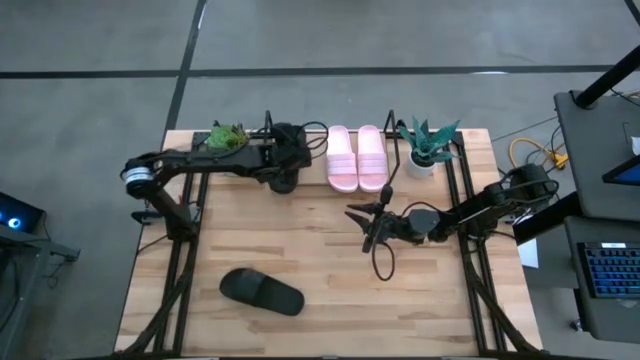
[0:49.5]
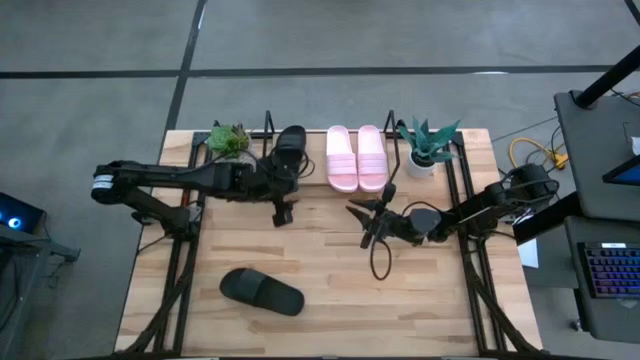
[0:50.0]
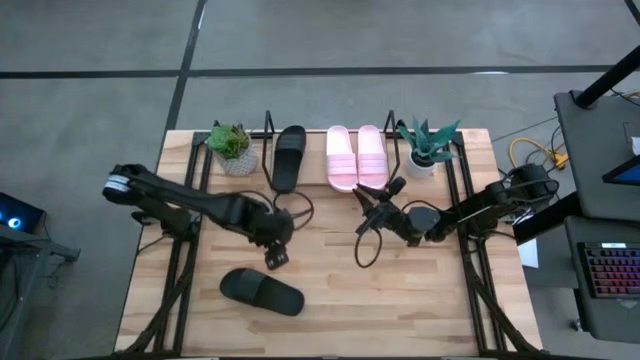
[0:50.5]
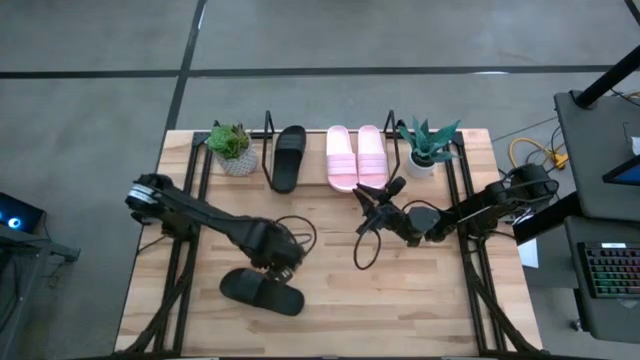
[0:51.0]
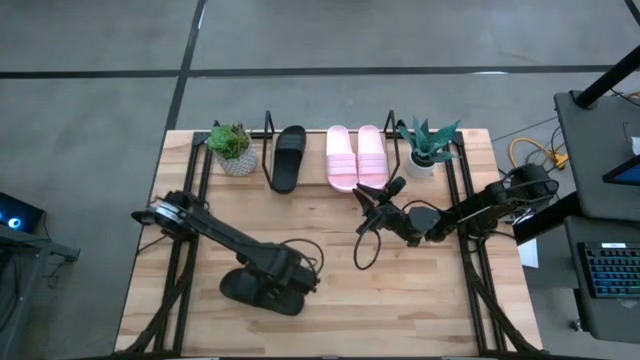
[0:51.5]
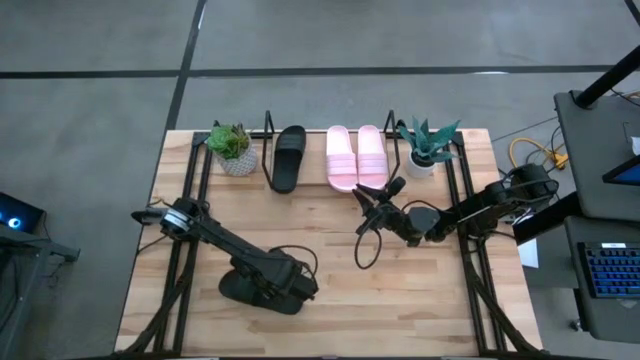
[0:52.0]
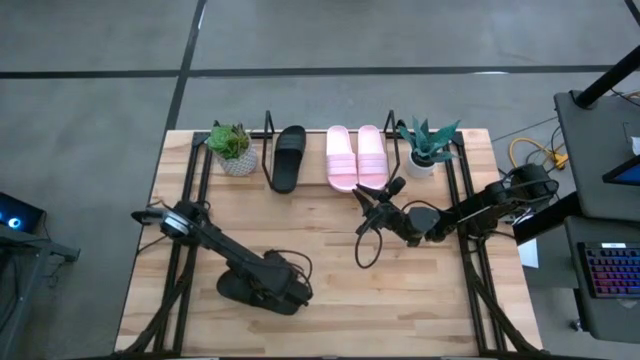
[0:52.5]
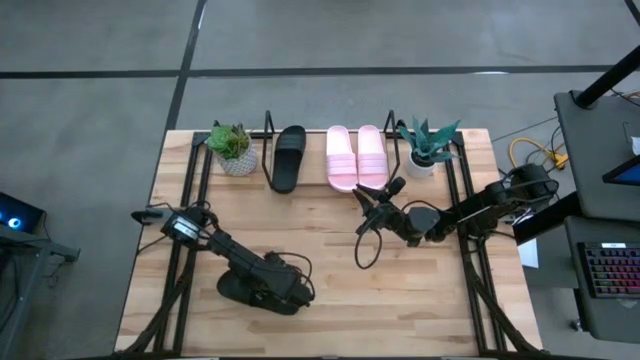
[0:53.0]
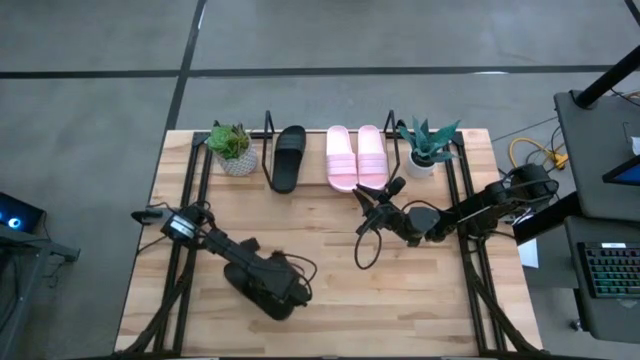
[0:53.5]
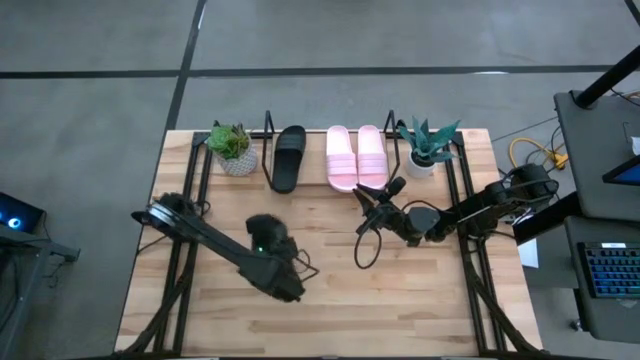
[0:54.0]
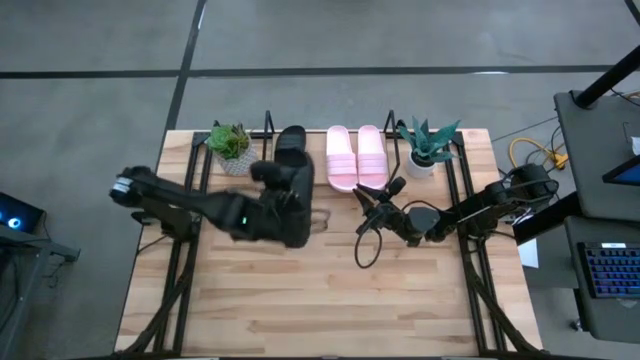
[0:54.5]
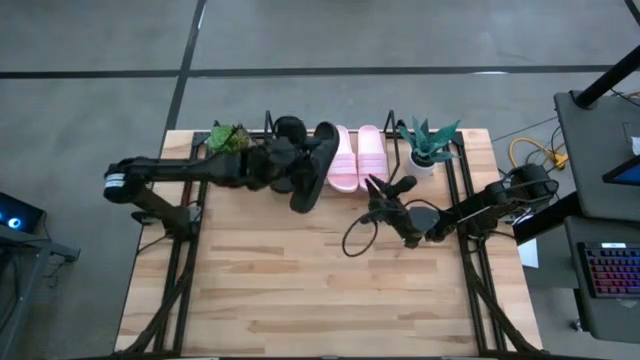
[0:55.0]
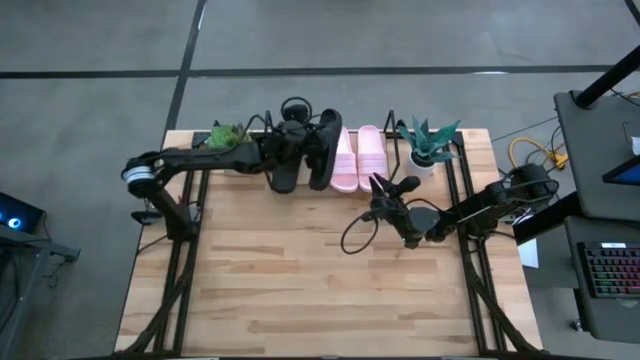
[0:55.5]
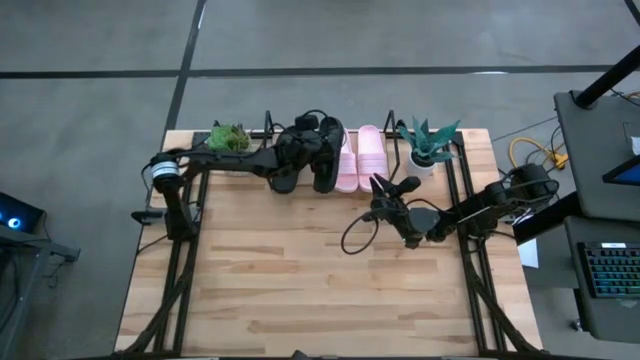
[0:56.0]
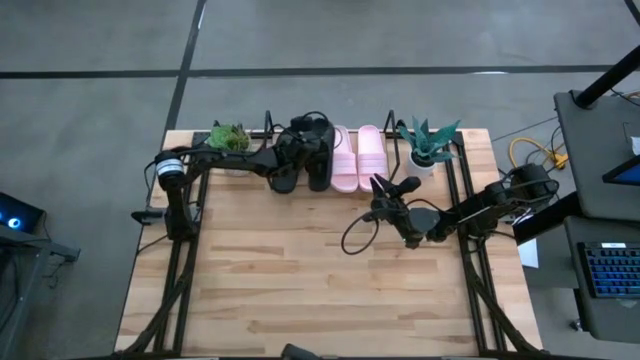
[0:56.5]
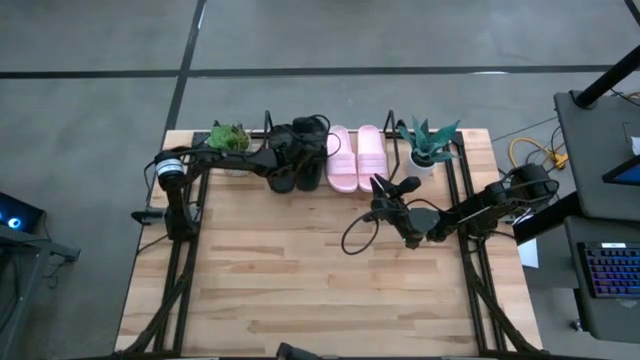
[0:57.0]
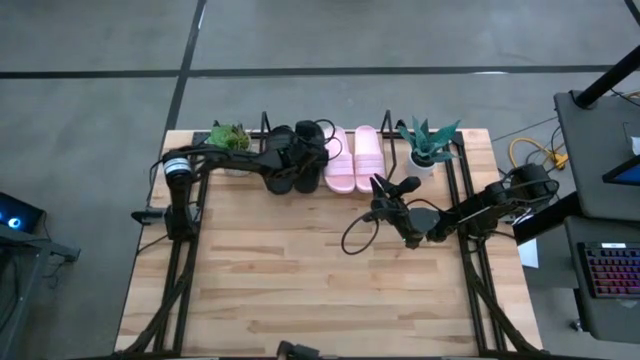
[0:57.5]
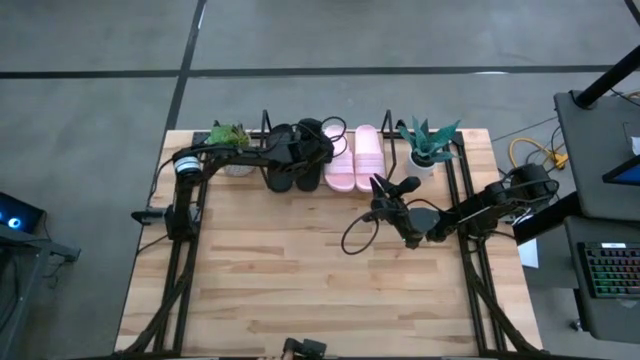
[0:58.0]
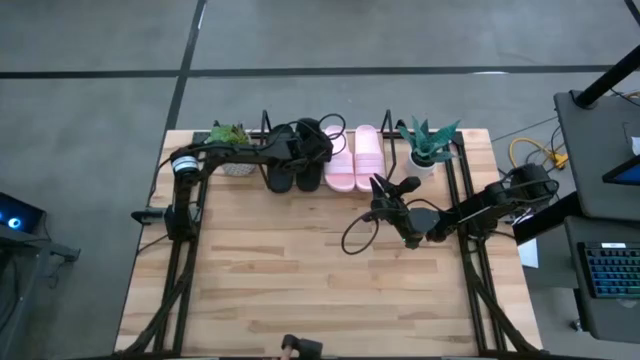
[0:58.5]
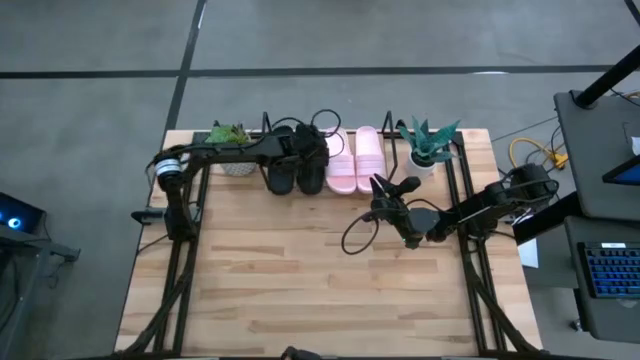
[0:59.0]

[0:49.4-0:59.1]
Task: Pick and place slides into the shelf
Put the black slipper on the shelf

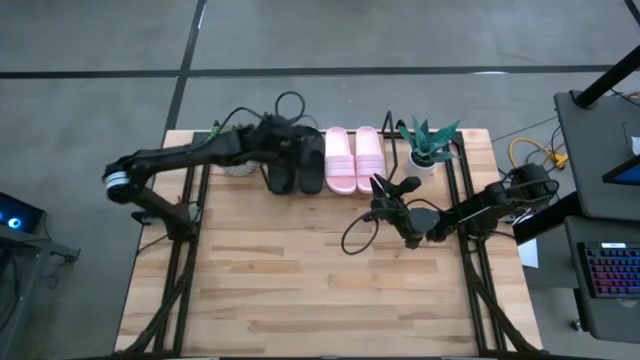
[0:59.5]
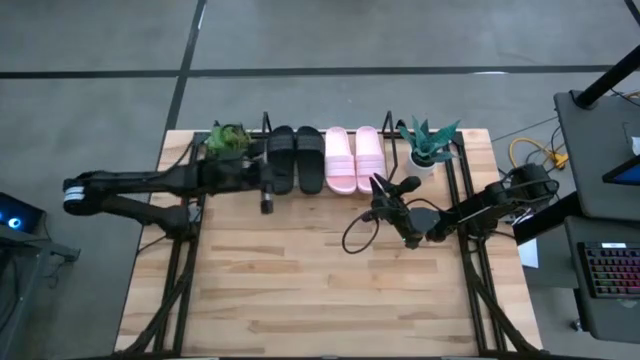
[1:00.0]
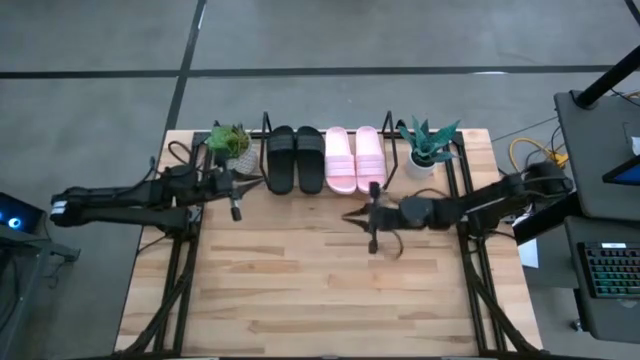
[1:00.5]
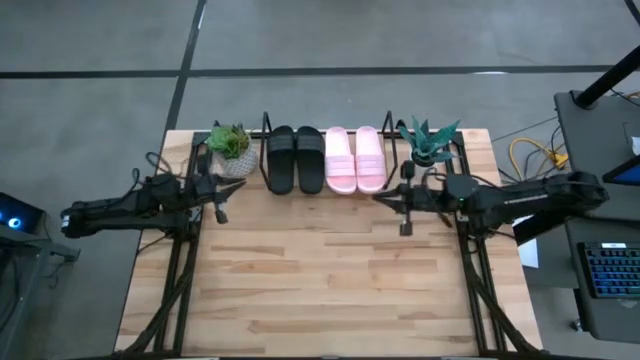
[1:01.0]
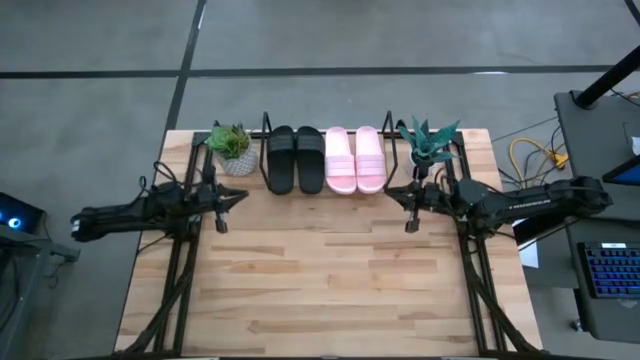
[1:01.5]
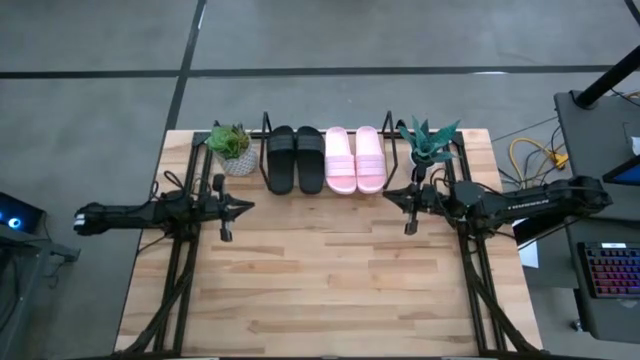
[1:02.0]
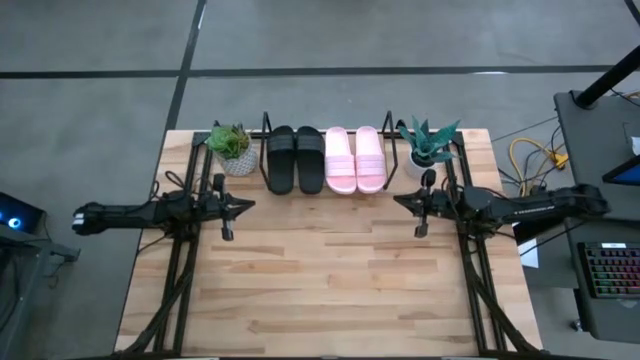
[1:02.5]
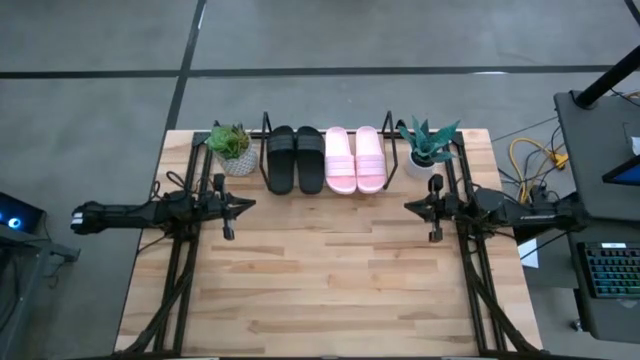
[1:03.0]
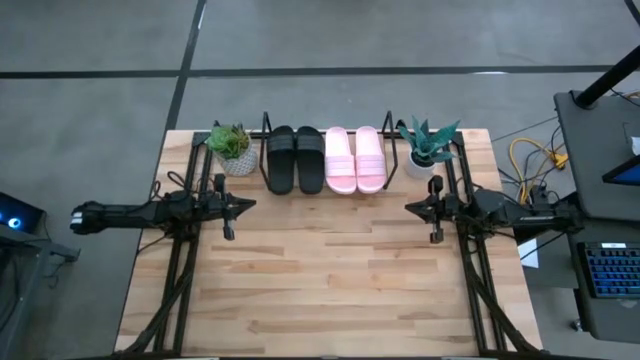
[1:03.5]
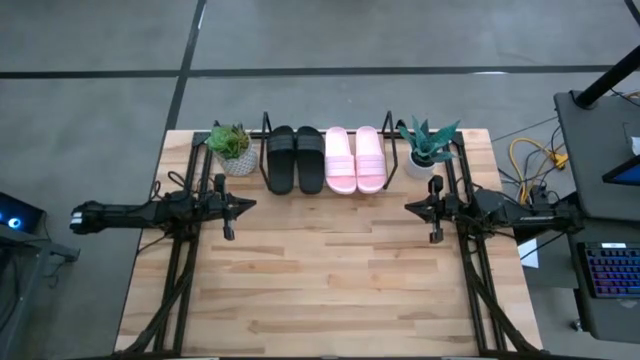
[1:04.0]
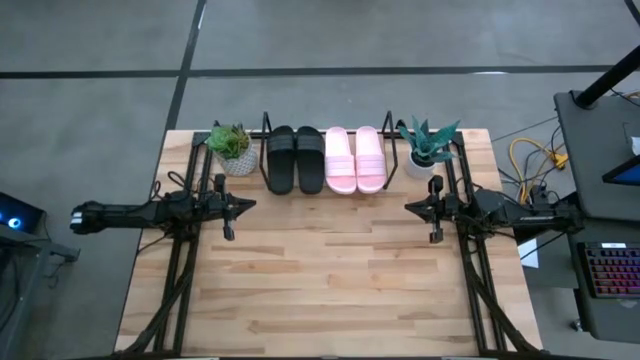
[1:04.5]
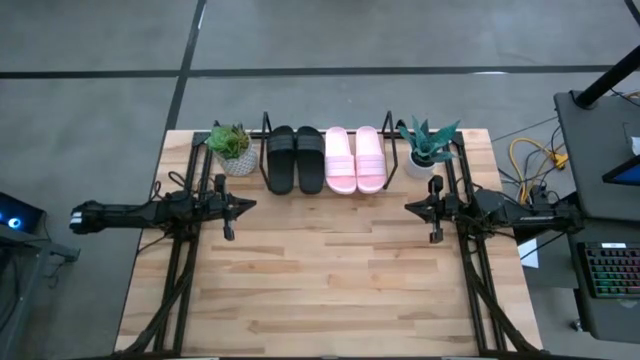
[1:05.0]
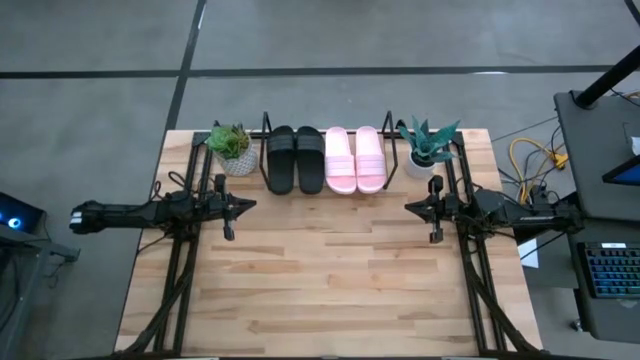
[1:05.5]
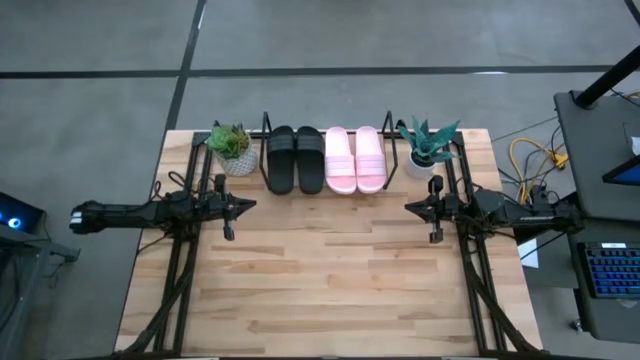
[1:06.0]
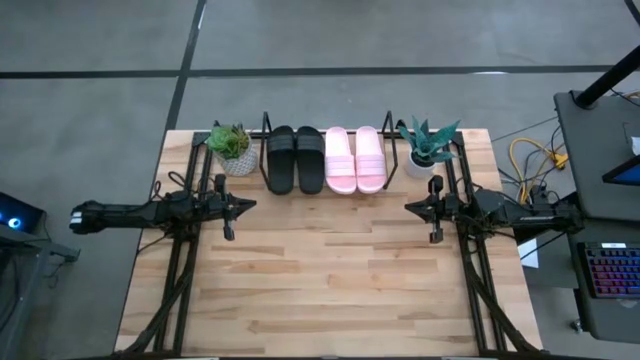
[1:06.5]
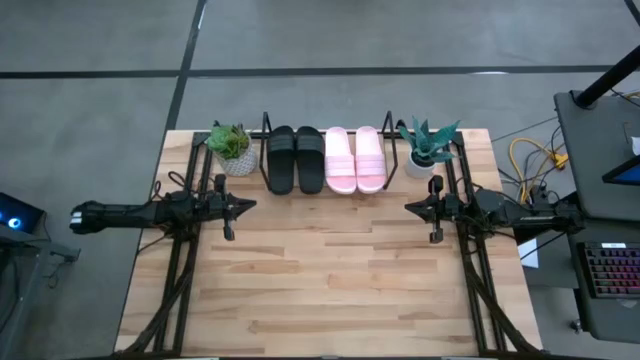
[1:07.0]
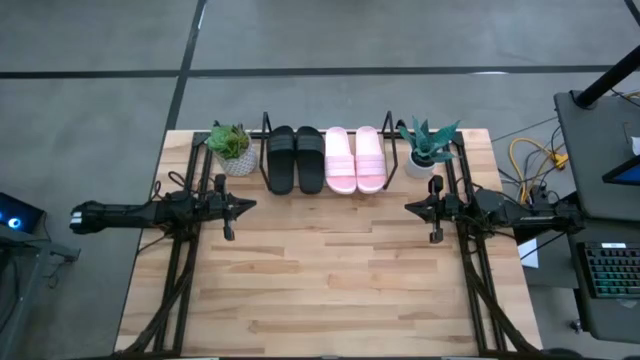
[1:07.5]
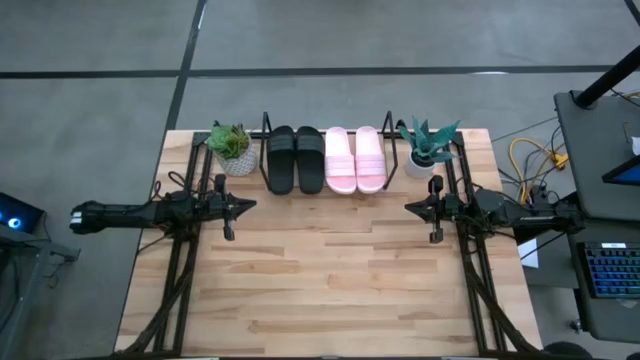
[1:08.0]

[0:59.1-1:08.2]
Return to Home Position

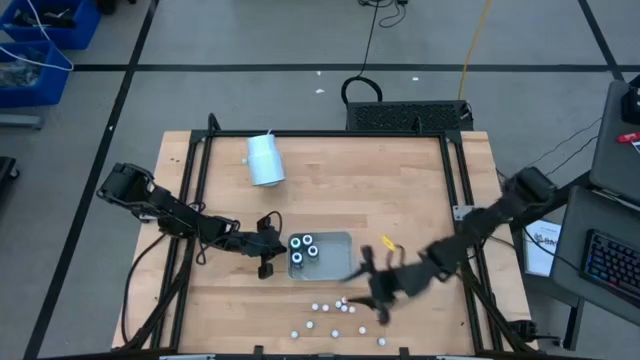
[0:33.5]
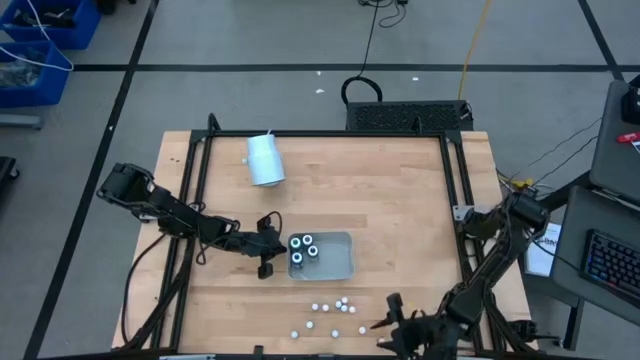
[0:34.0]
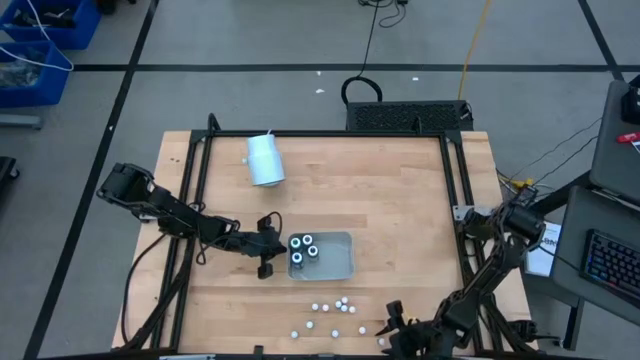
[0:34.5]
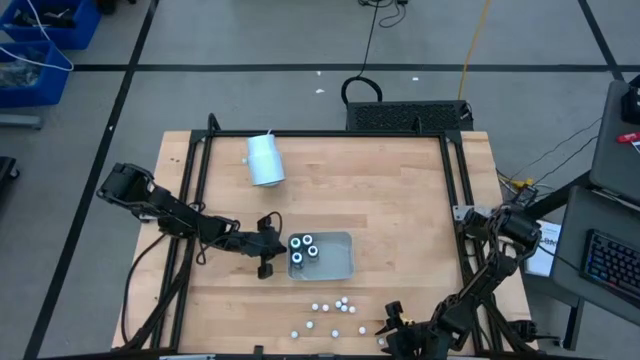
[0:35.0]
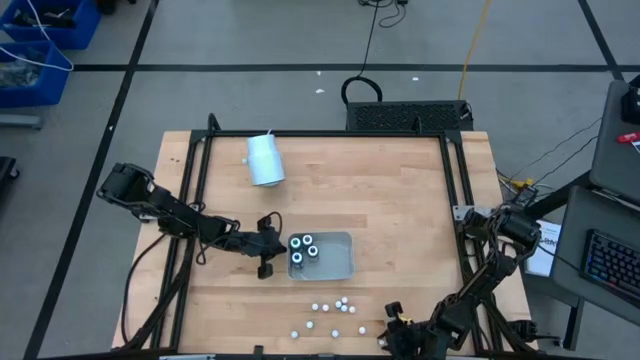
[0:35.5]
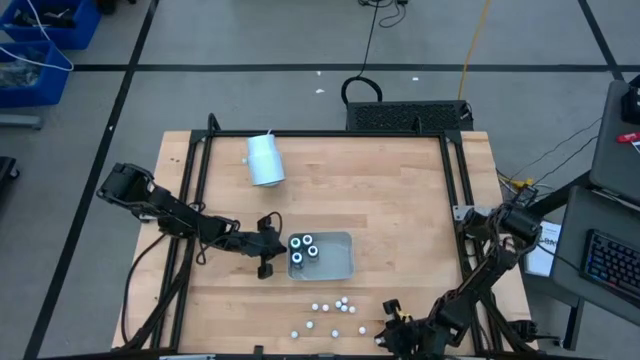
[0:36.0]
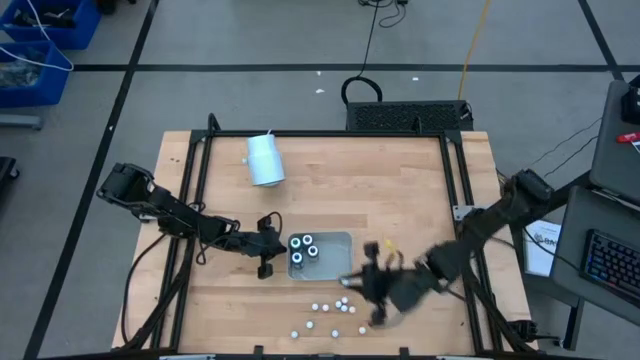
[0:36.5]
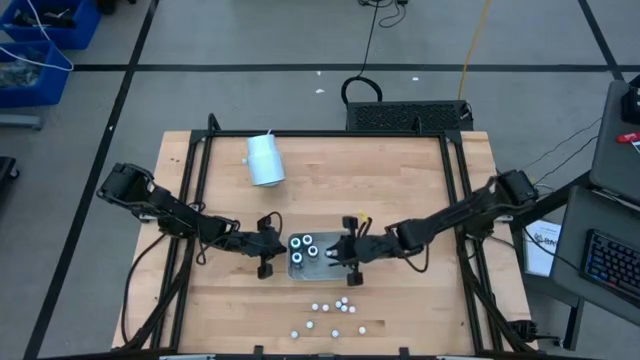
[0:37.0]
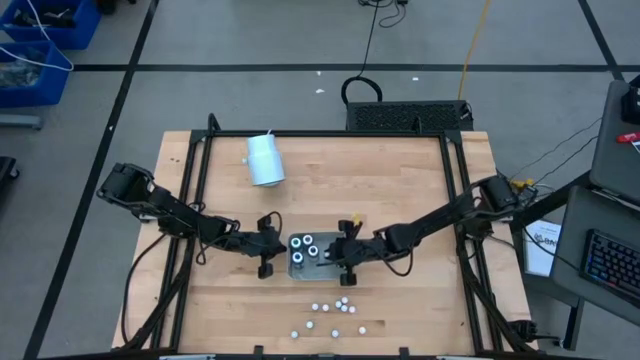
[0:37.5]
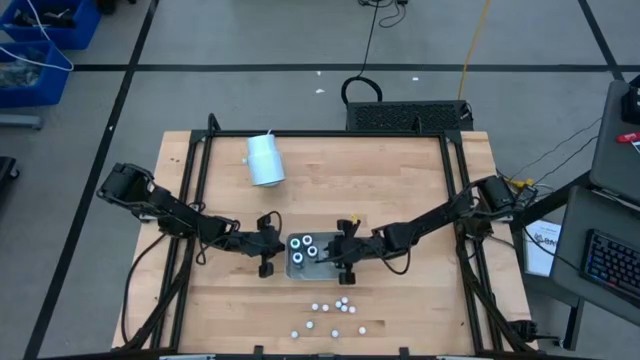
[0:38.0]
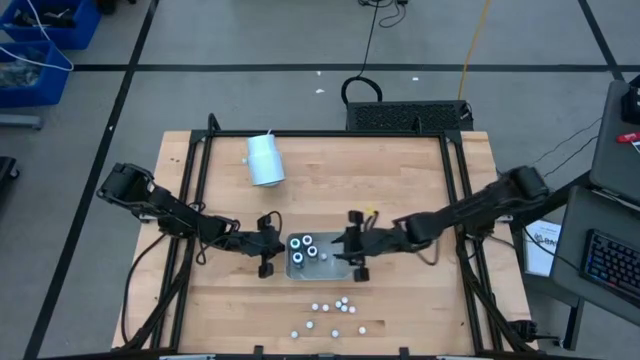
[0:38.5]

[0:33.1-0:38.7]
Task: Pick & Place food coloring
Put the small blue food coloring bottle into the gray bin
